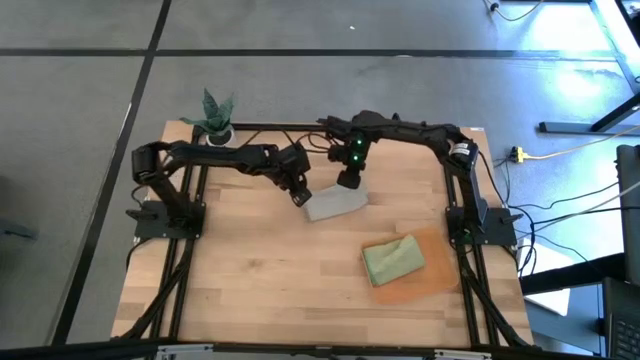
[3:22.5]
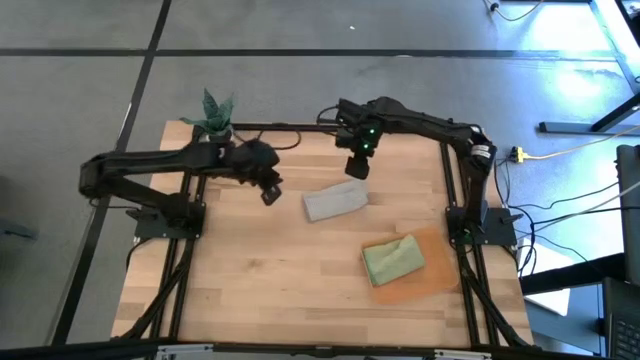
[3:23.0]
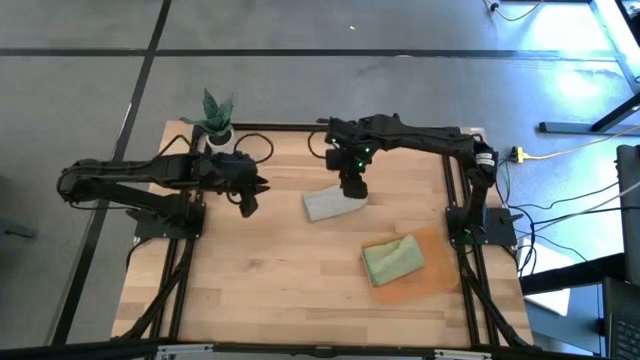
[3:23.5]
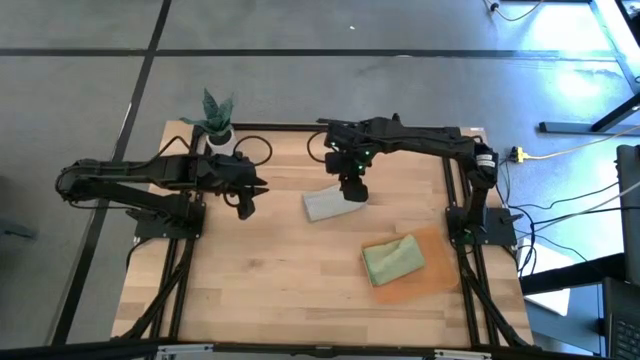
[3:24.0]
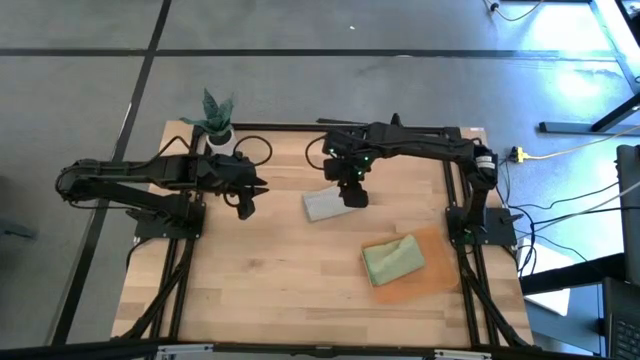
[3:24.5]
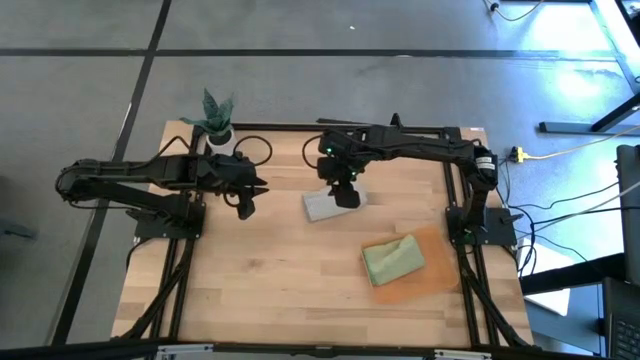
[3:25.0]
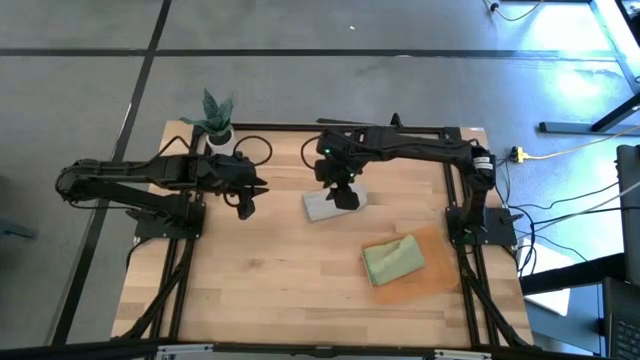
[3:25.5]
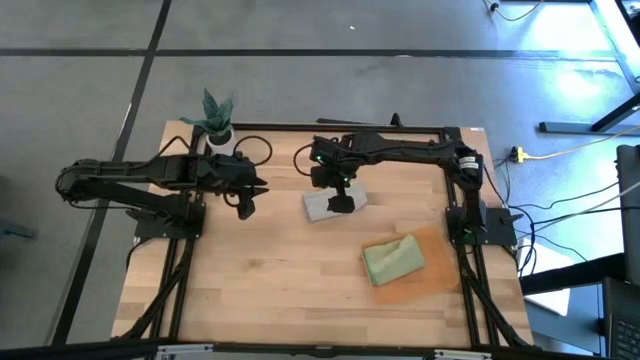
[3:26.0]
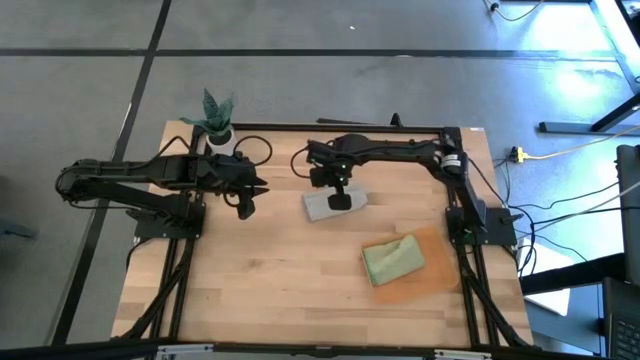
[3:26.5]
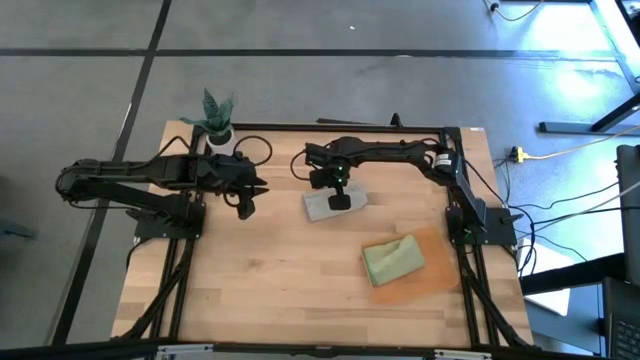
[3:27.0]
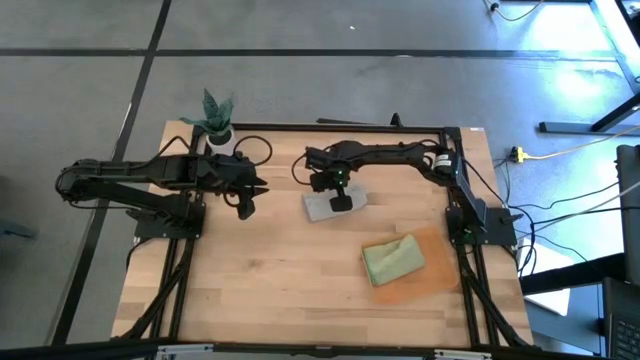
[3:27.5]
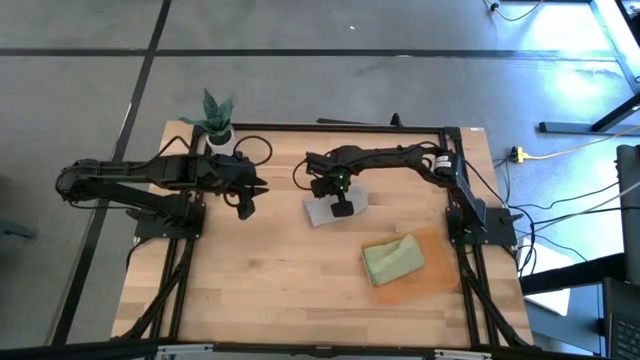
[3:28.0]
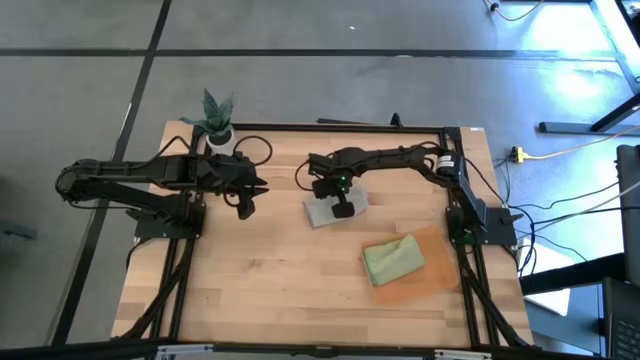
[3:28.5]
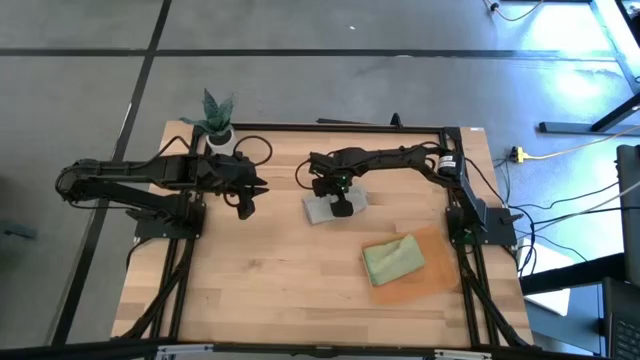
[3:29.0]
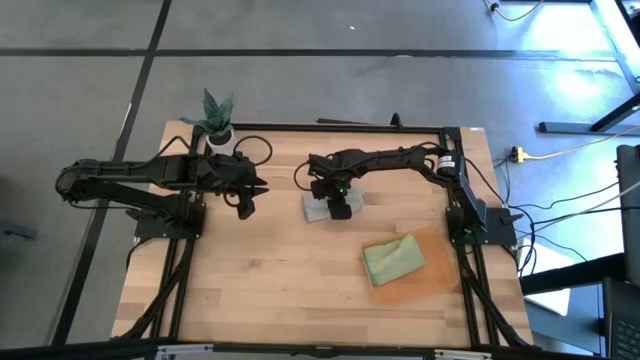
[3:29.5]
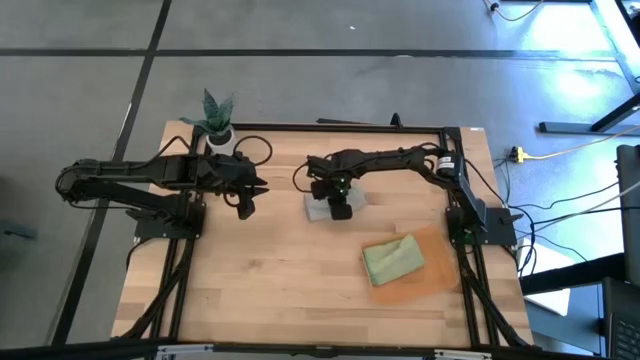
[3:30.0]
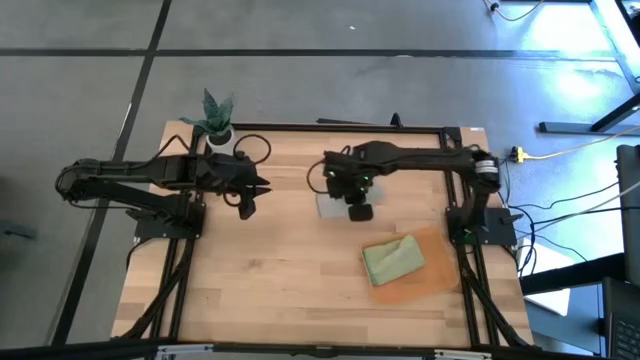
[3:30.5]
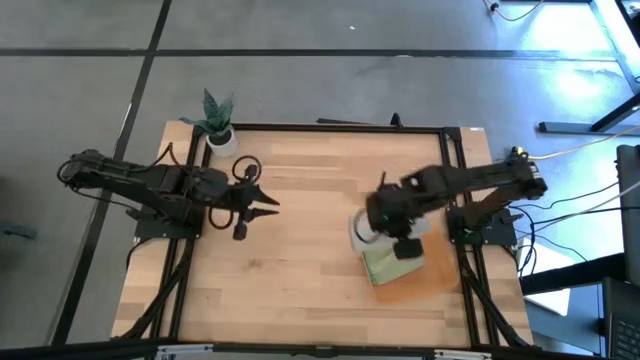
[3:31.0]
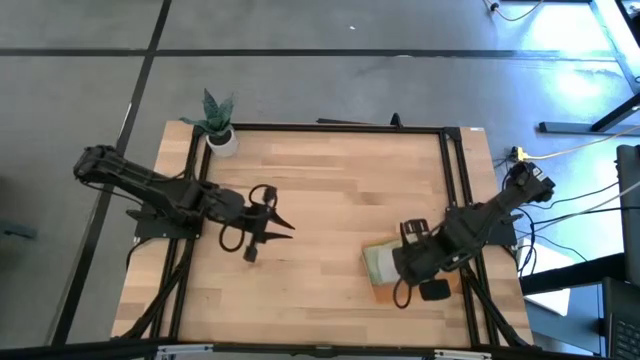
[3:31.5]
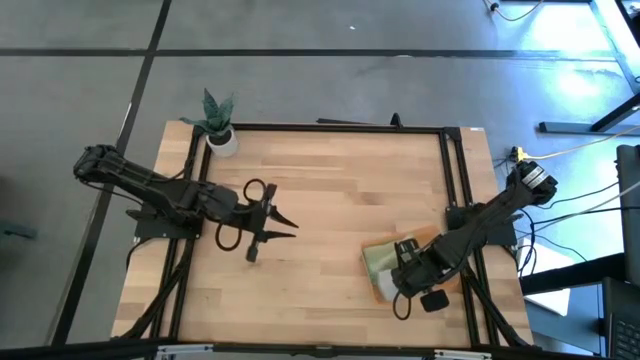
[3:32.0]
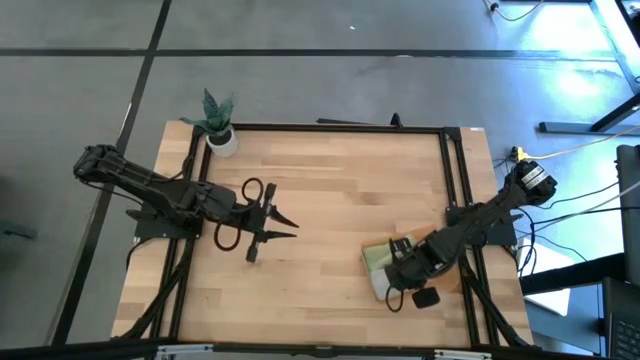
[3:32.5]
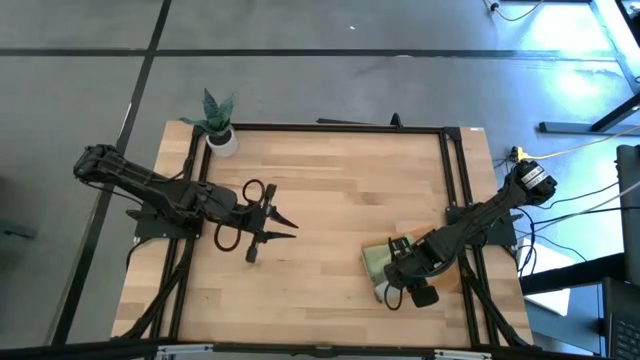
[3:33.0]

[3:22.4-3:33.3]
Task: Roll microfiber towels into tight, uniform cylinder then place into a basket
Put the rolled gray microfiber towel into the orange bin

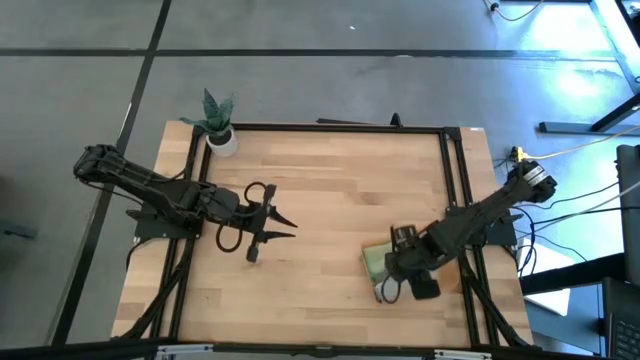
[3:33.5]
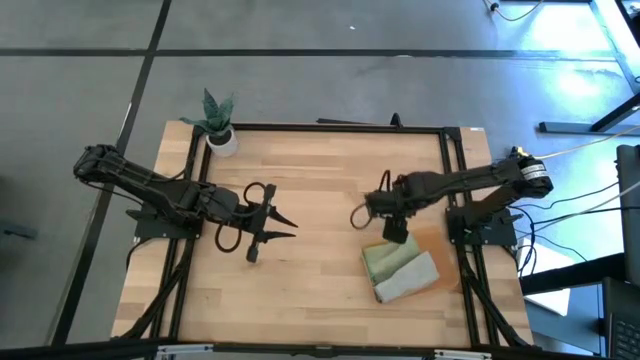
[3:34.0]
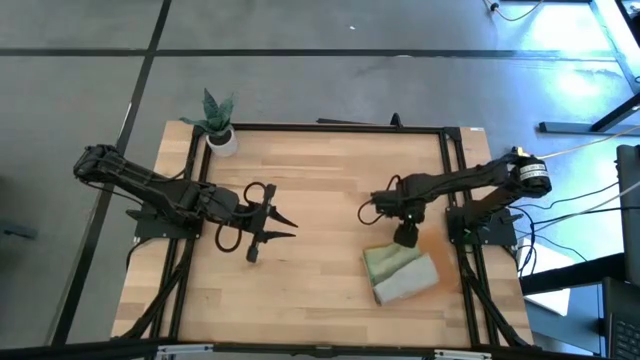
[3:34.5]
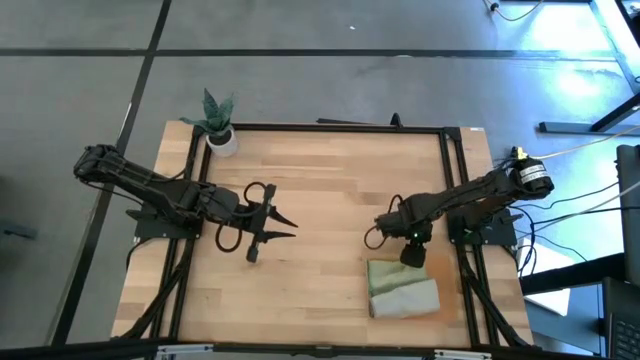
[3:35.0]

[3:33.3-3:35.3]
Move the orange bin to the bottom right of the table

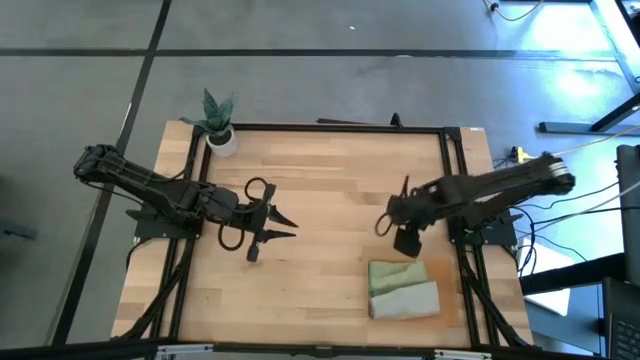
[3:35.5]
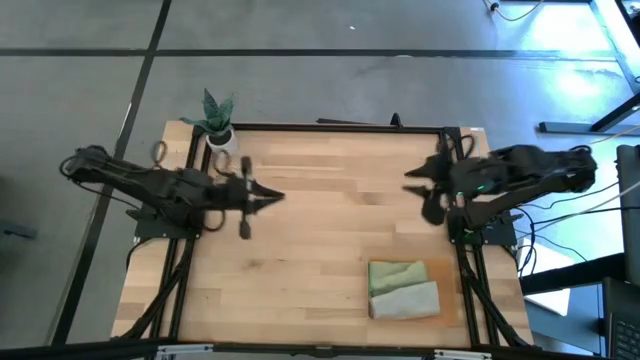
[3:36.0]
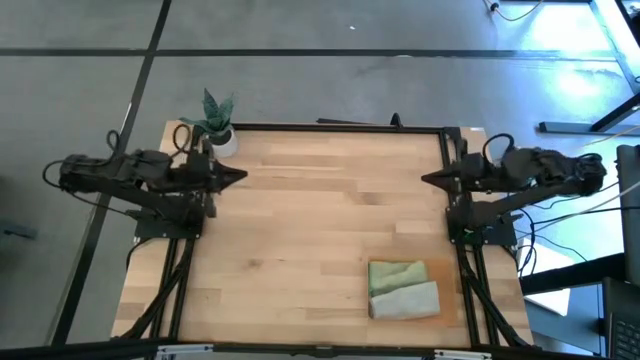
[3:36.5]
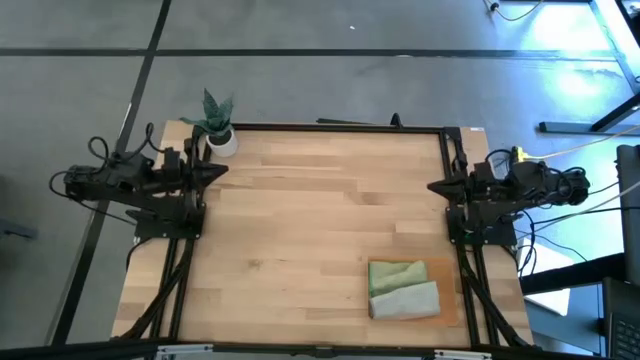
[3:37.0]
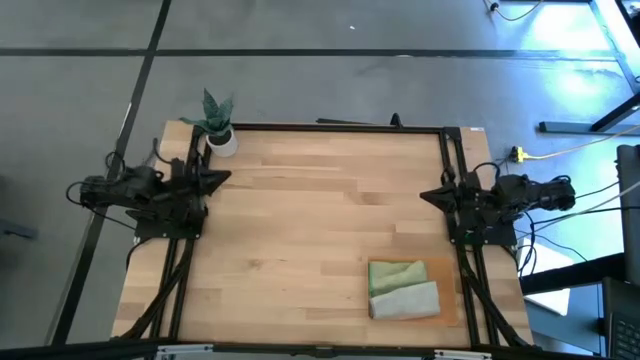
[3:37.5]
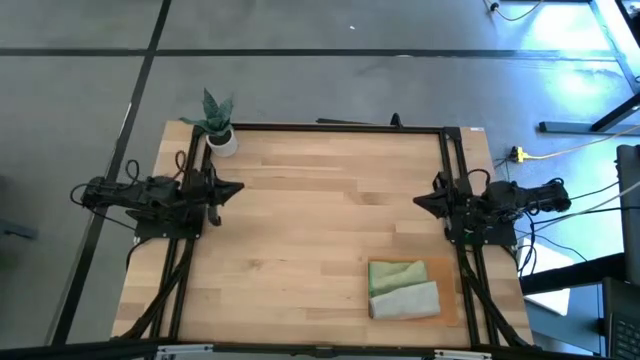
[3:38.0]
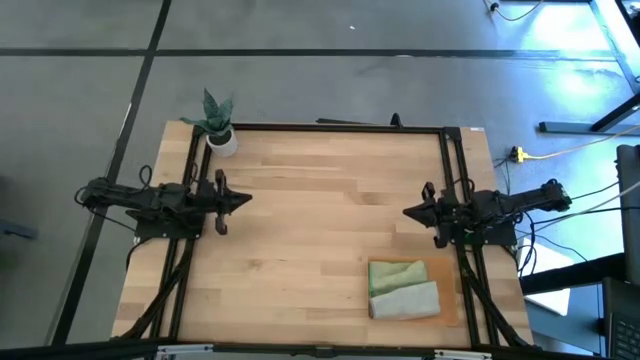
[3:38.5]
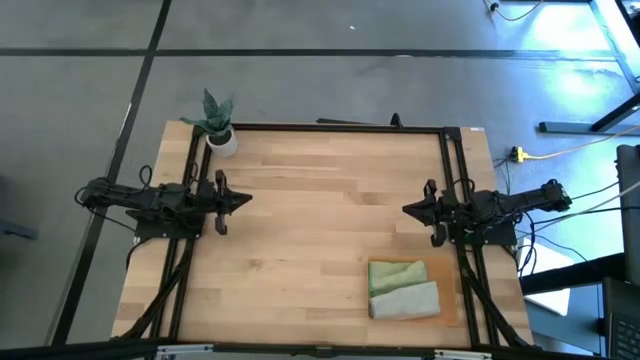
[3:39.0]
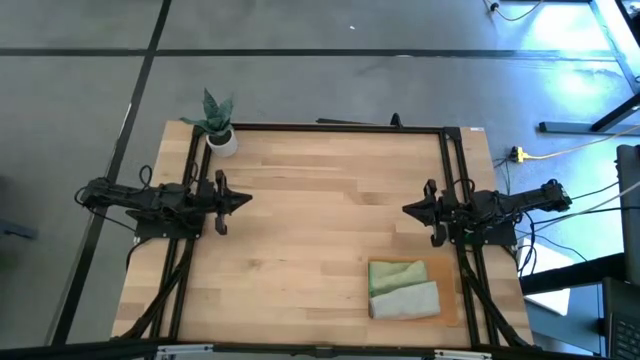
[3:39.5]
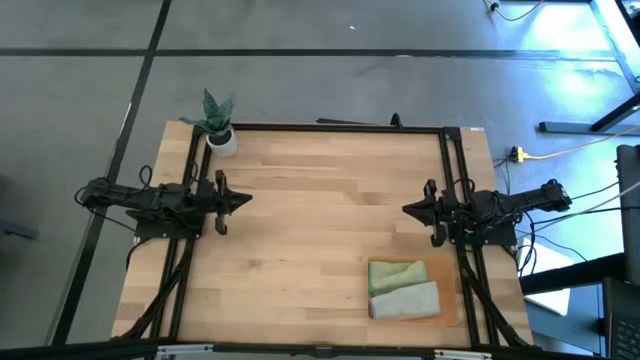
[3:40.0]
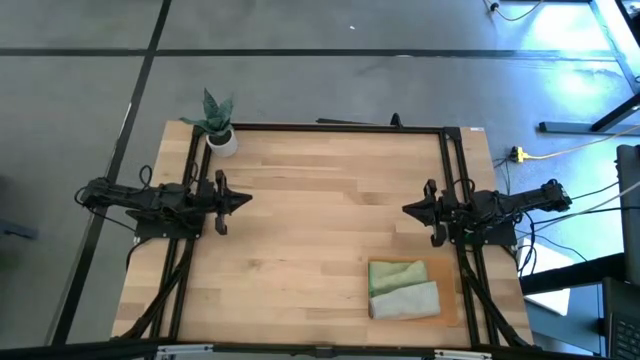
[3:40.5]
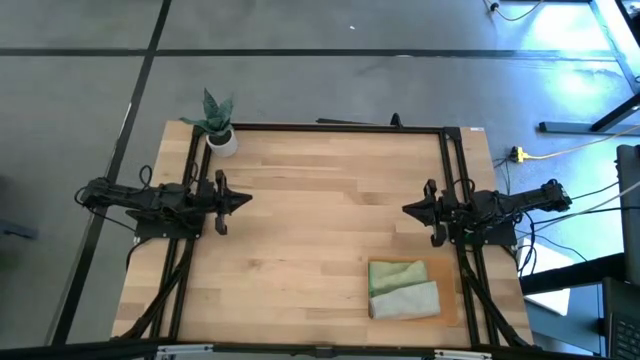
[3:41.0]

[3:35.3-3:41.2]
Return to Home Position

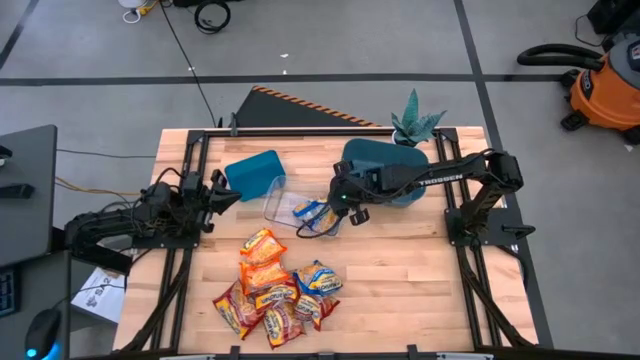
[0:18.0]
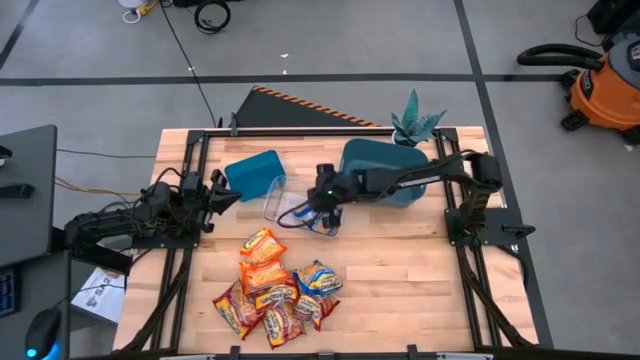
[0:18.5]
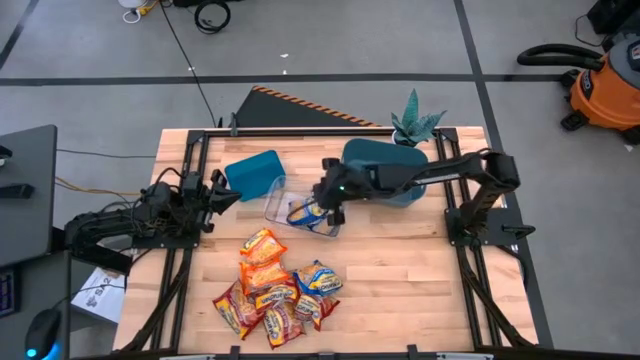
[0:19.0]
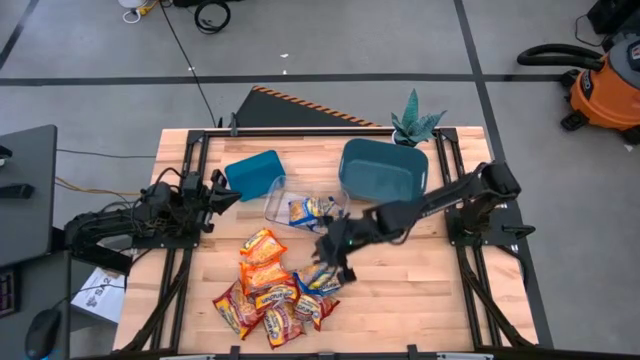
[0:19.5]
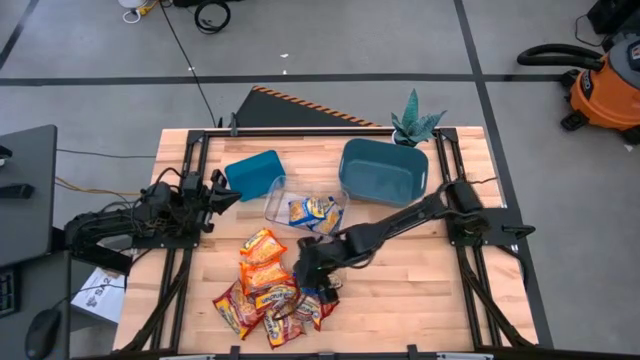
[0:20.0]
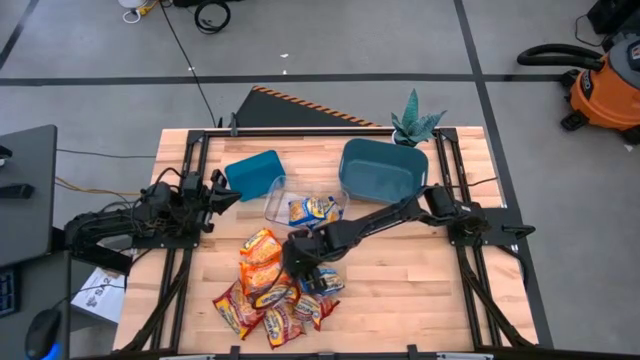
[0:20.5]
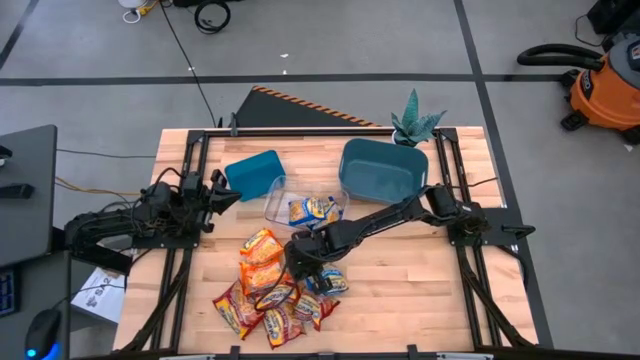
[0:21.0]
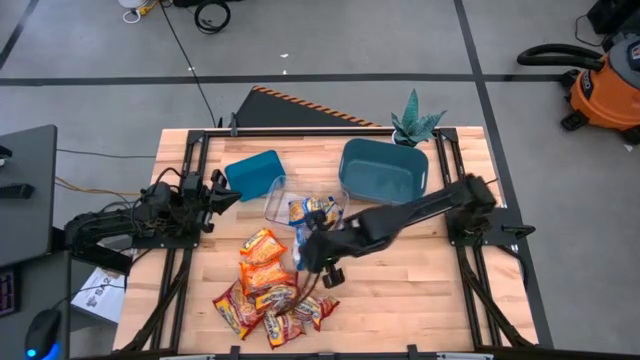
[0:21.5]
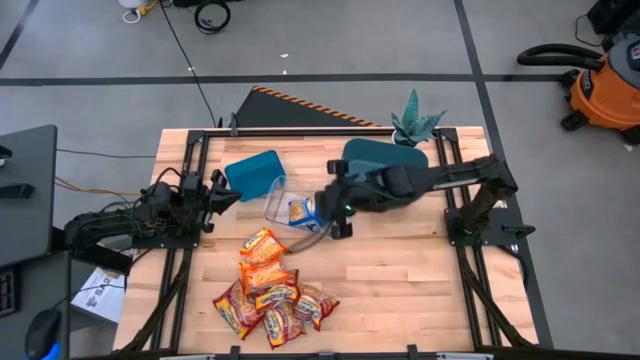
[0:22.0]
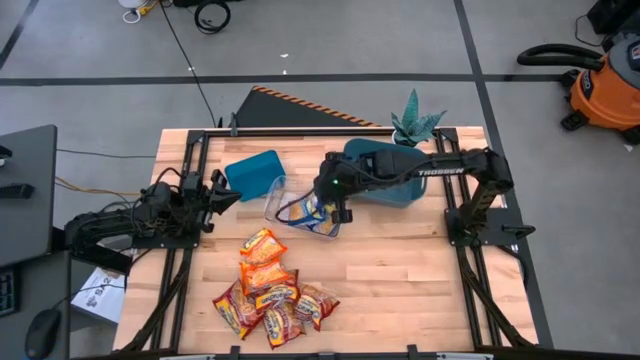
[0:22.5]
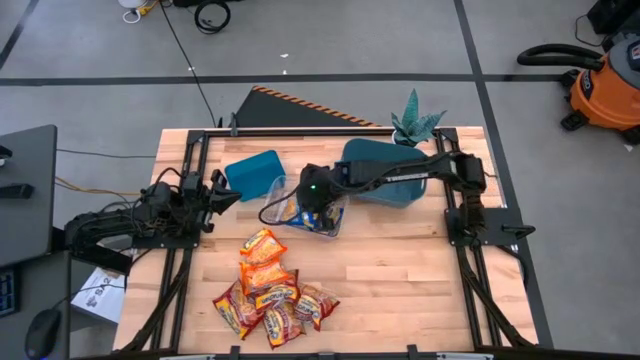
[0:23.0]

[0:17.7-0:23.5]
Task: Sort Maruchan noodles
Put the blue noodle pack into the center transparent bin
